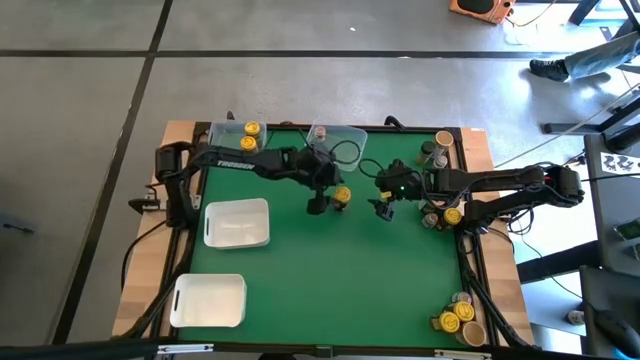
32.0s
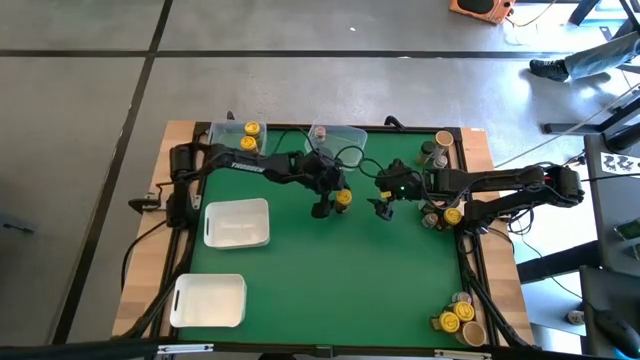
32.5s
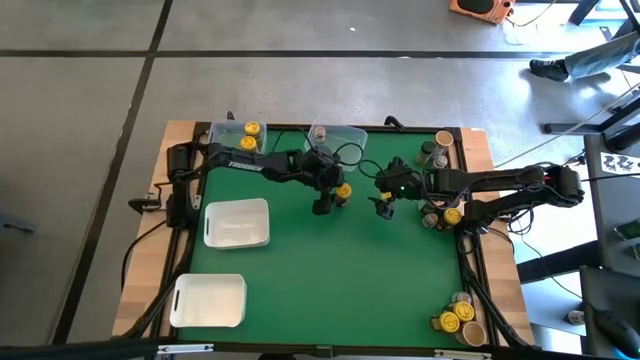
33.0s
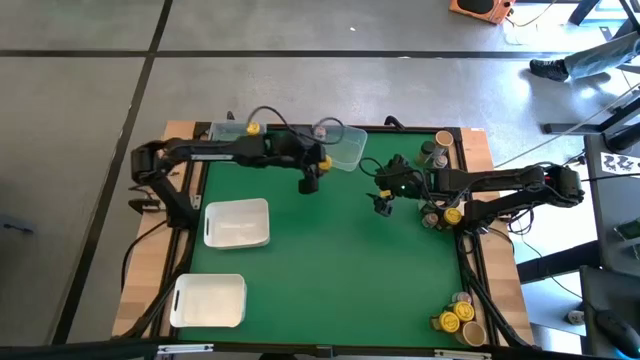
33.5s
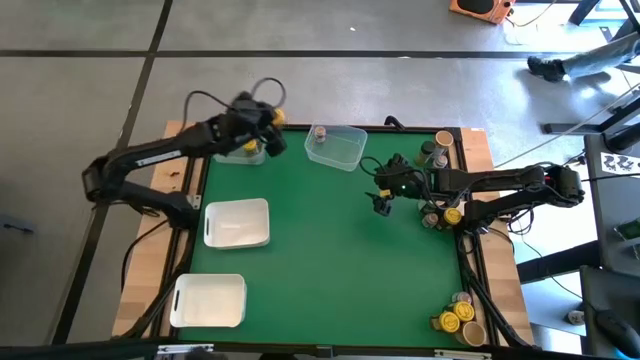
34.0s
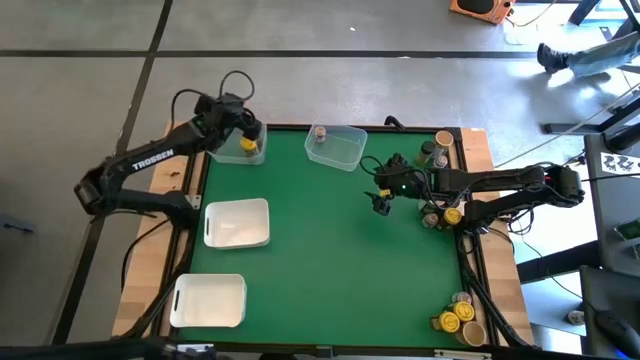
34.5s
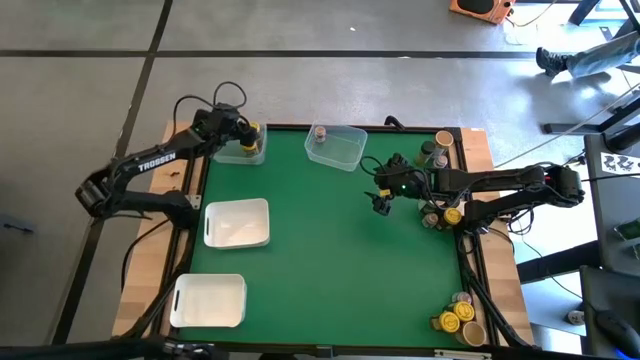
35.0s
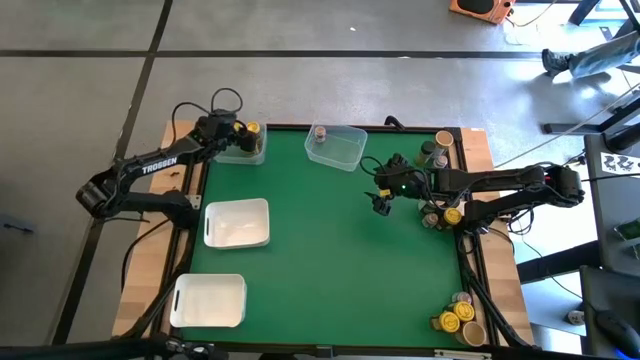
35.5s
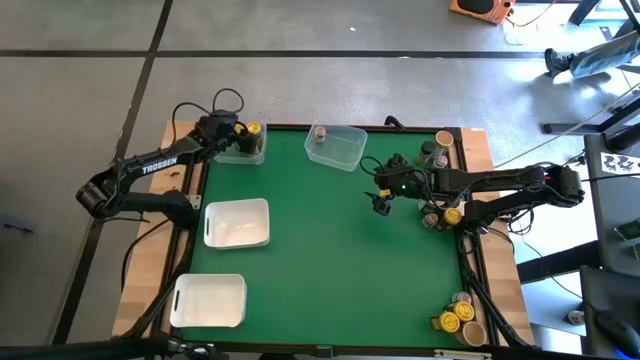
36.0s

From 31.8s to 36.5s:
Task: Sort spices by type
Put the yellow seasoning bottle into the left transparent bin

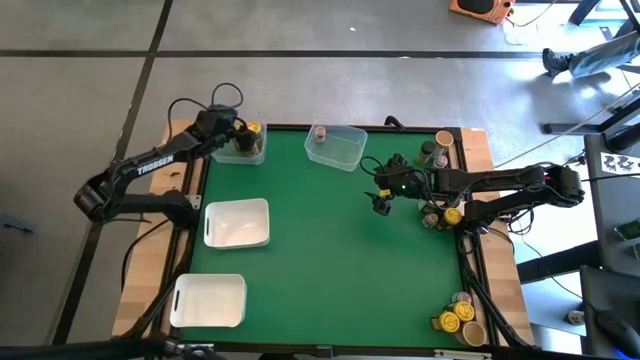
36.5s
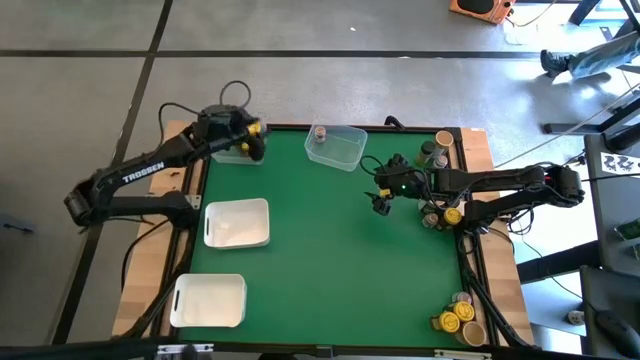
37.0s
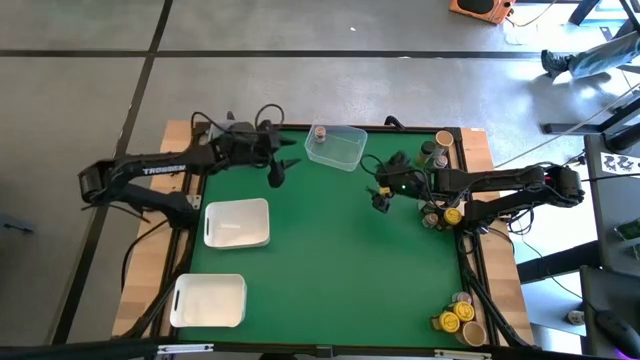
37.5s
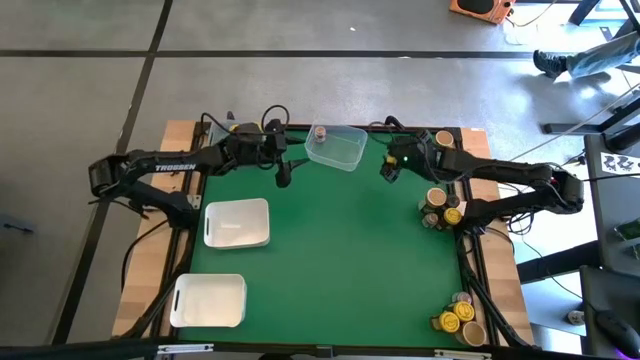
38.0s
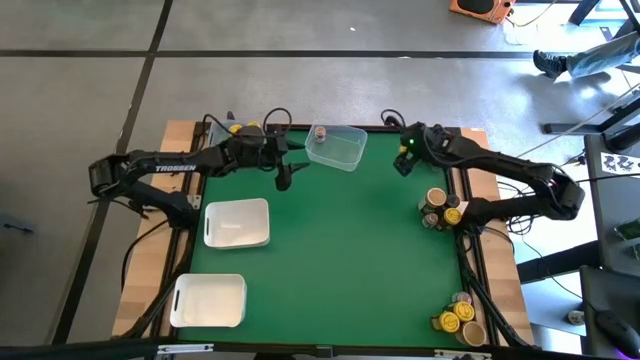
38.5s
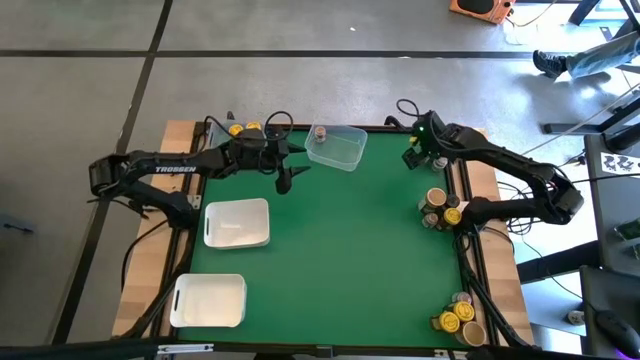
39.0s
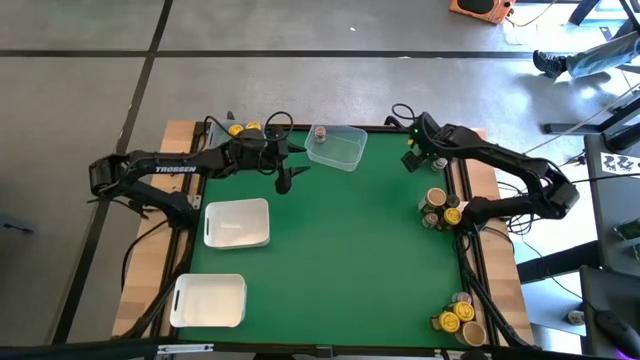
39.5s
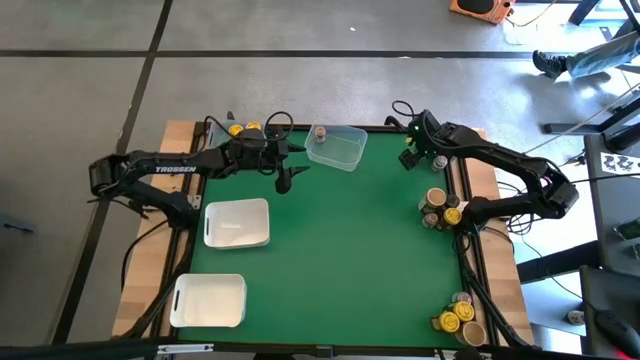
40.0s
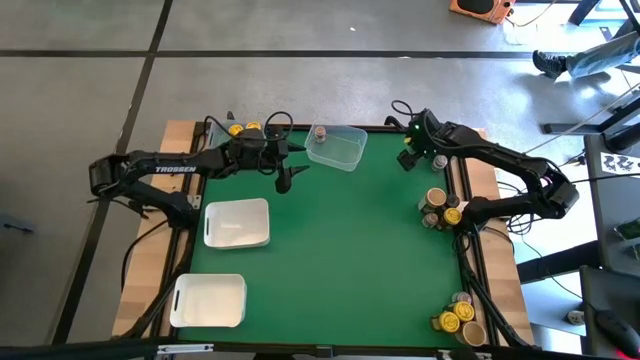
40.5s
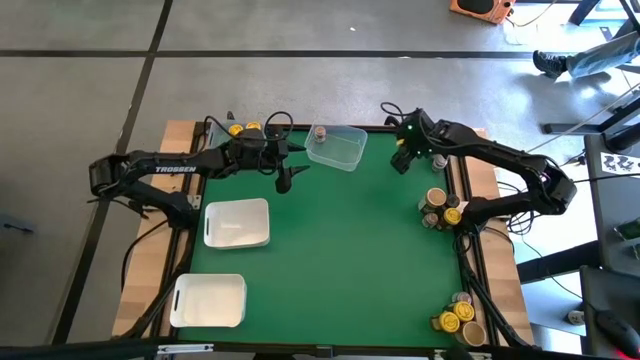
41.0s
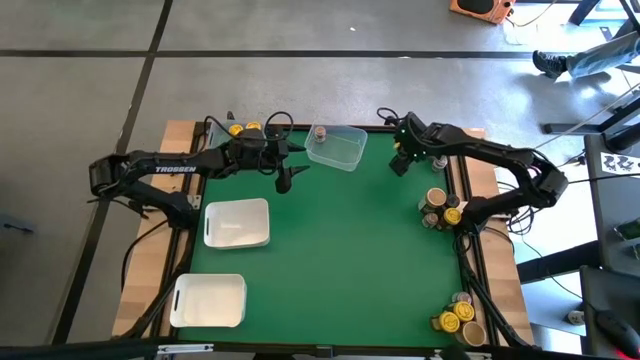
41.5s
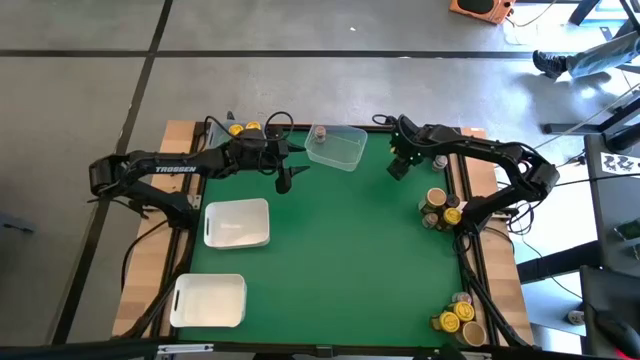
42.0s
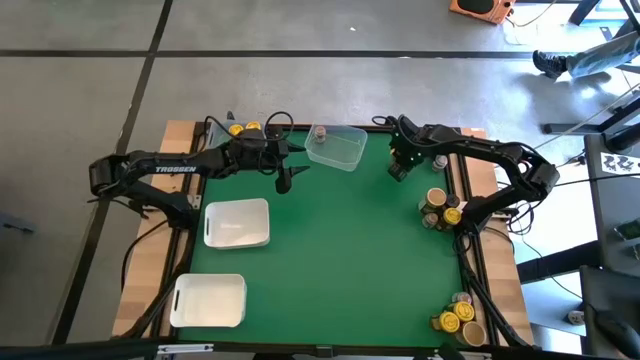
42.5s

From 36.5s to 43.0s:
Put the black seasoning bottle into the top white bin

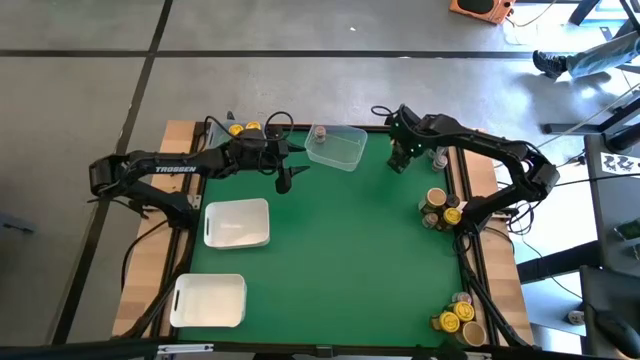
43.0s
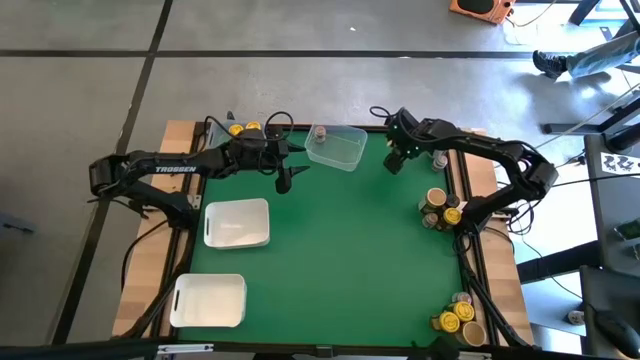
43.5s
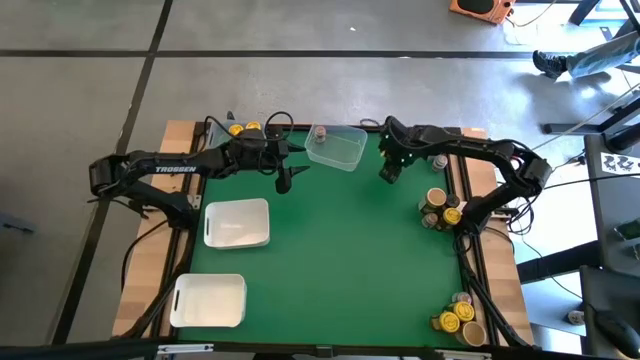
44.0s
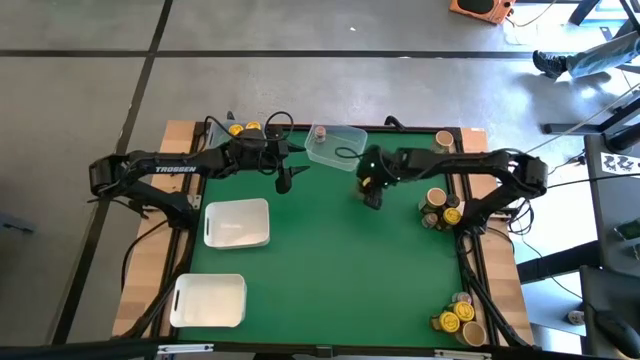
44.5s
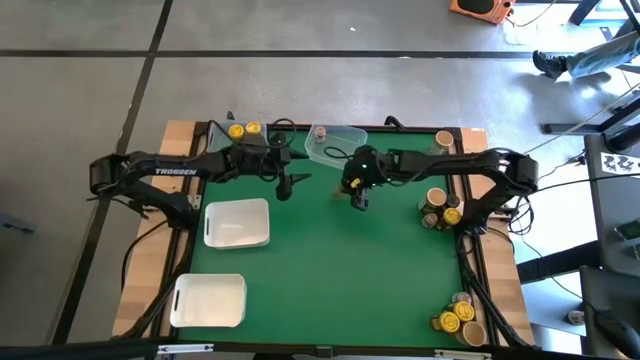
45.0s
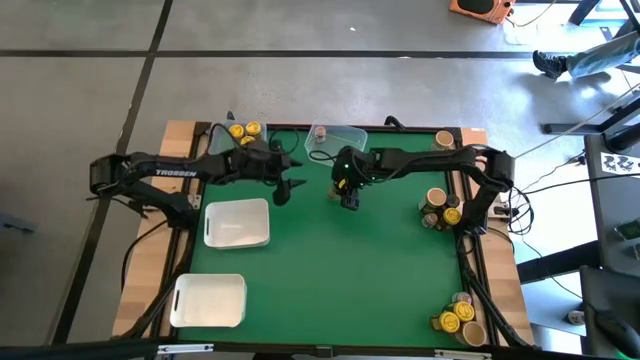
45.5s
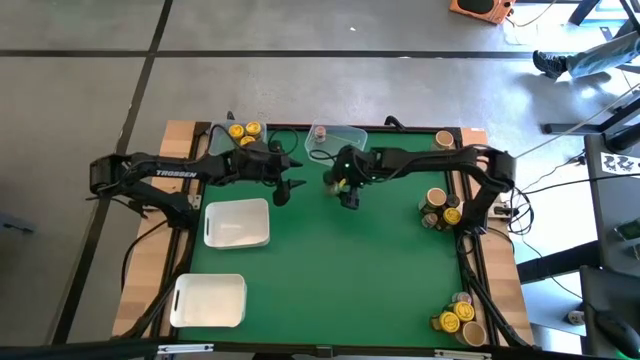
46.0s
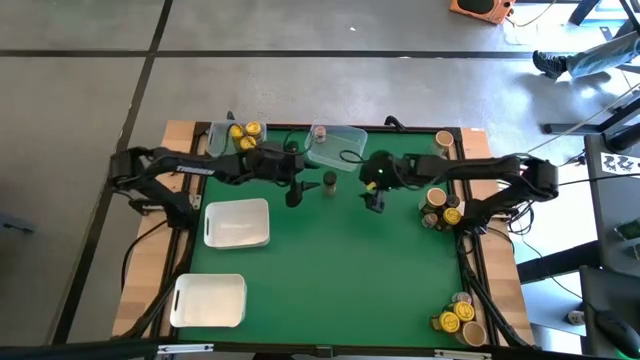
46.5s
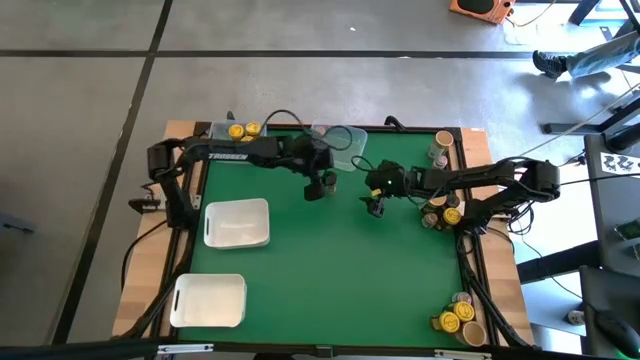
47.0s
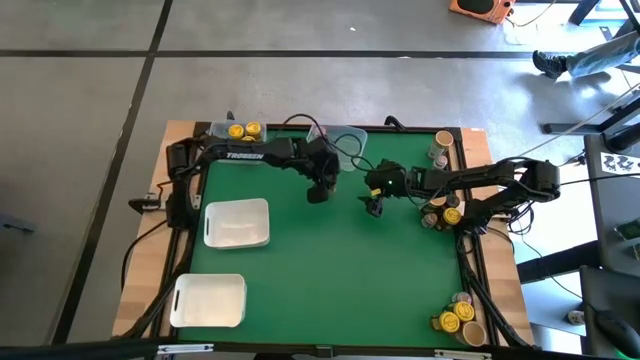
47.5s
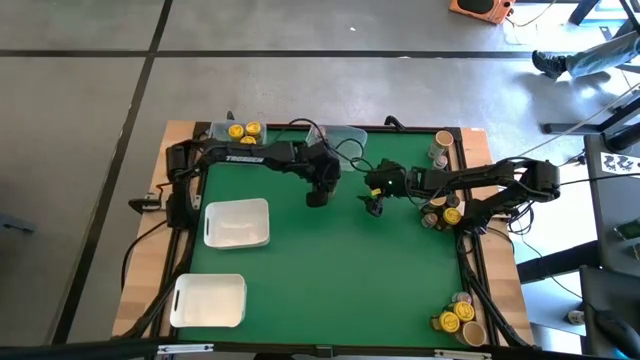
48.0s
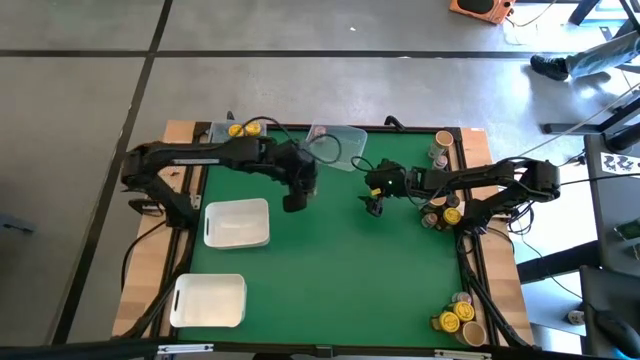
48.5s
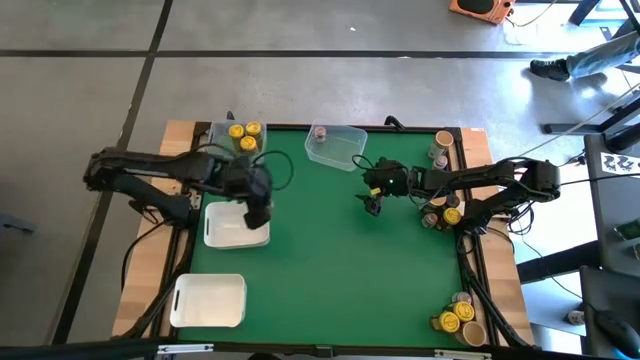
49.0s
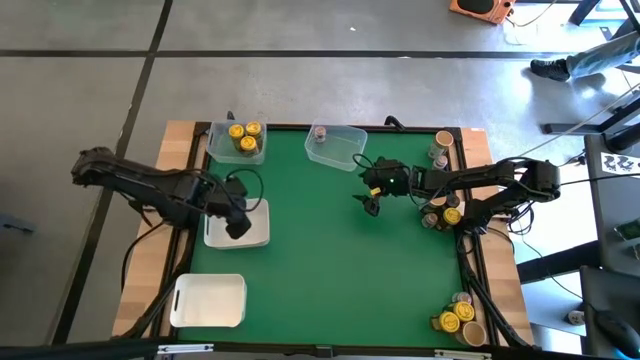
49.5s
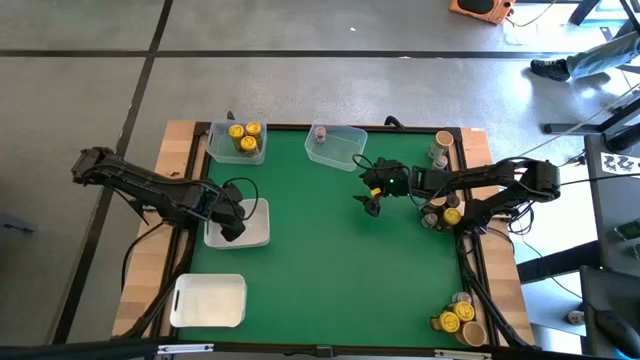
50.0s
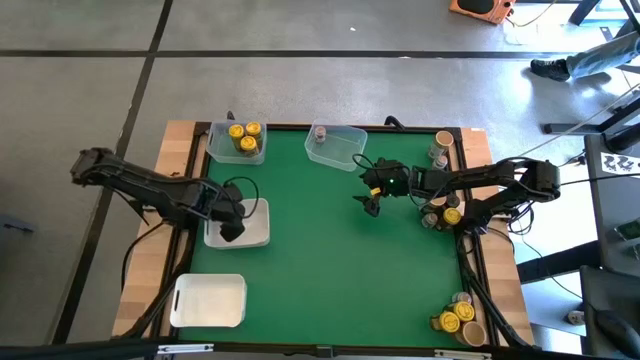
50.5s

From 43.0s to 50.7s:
Put the black seasoning bottle into the top white bin

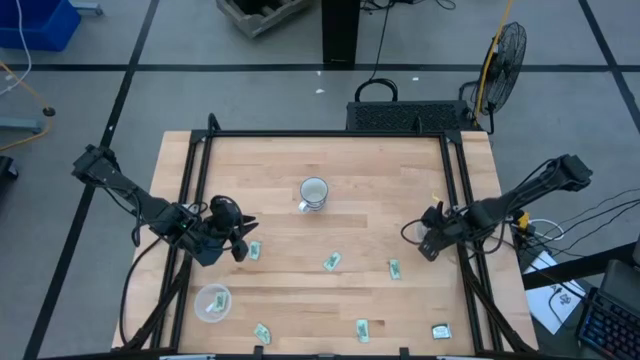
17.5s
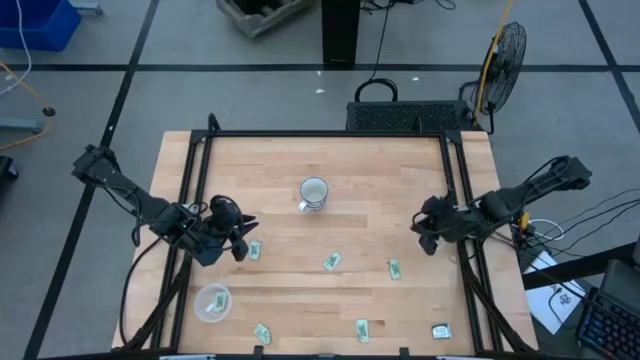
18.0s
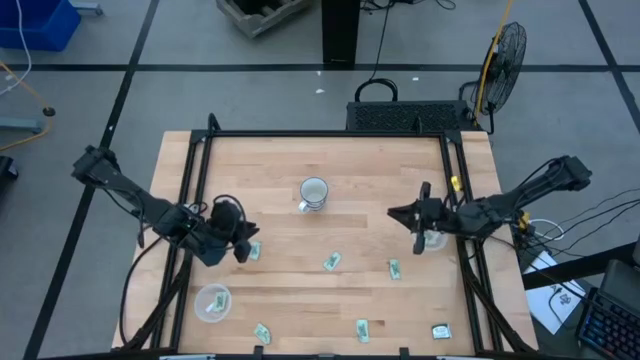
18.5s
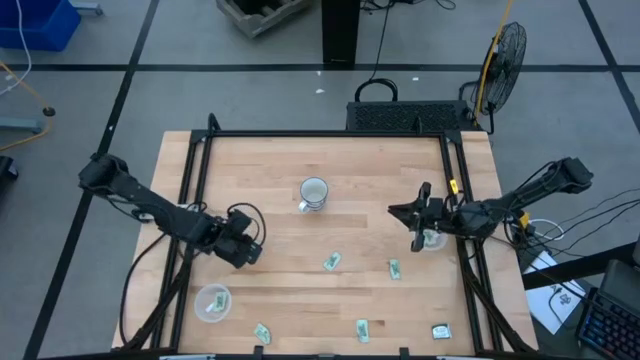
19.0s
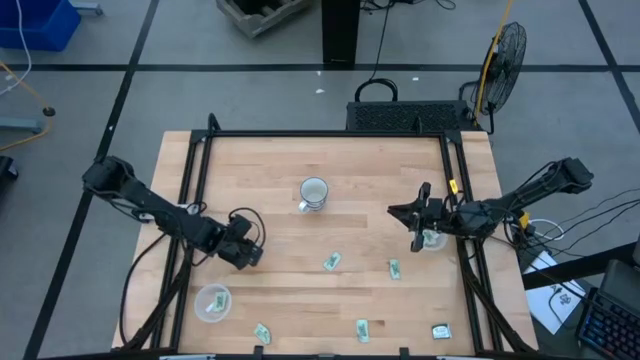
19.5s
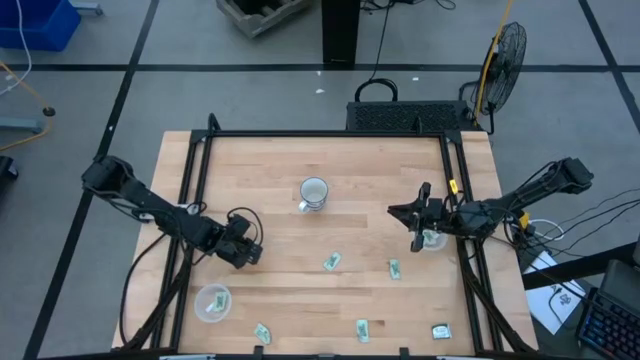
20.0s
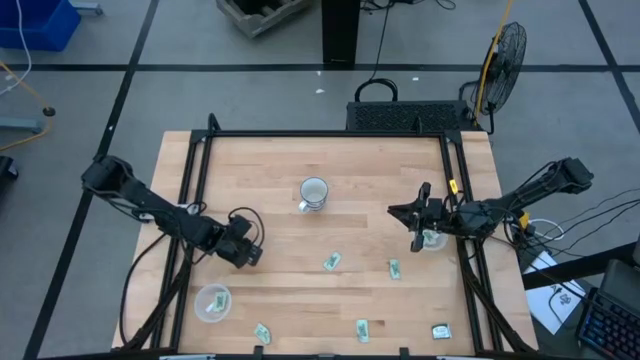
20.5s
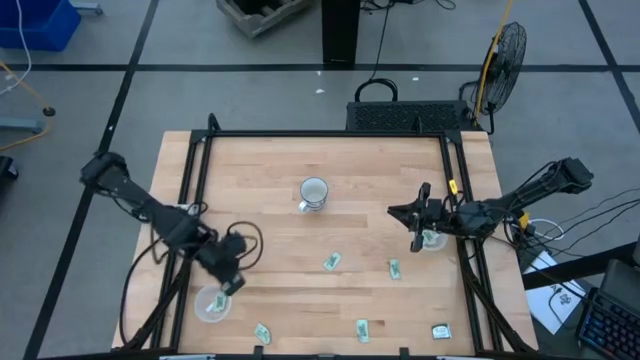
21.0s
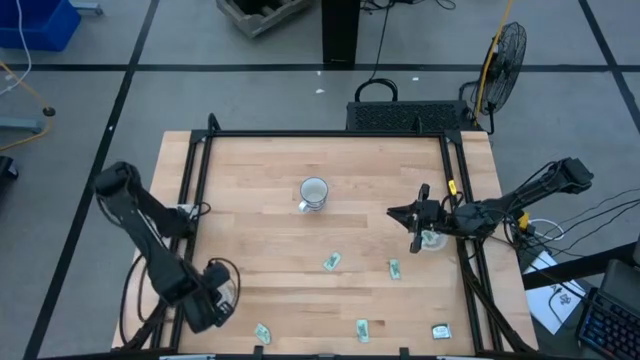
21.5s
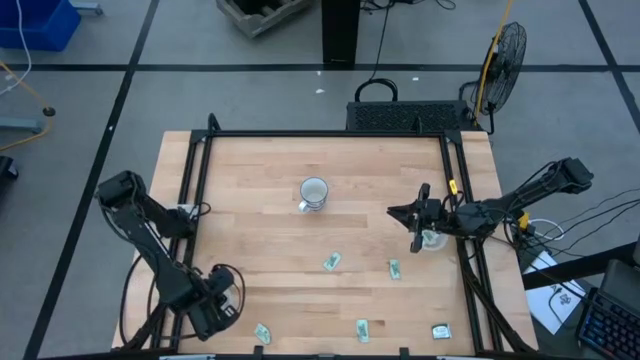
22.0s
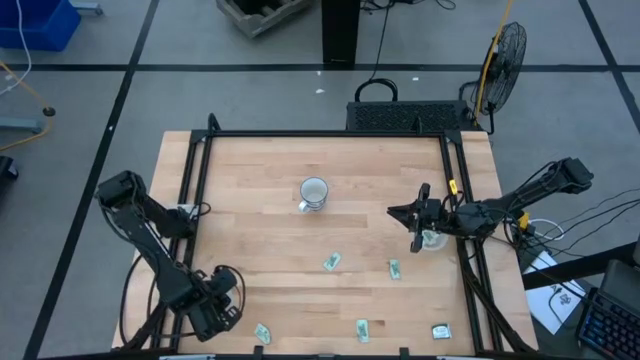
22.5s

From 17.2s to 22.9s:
Task: Pick and place Stevia / Truvia into bins
Put the green stevia packet into the left transparent container
